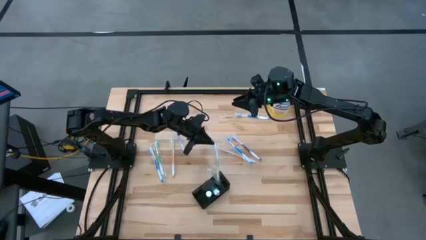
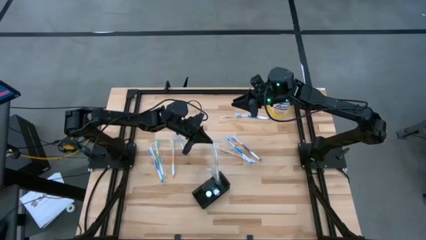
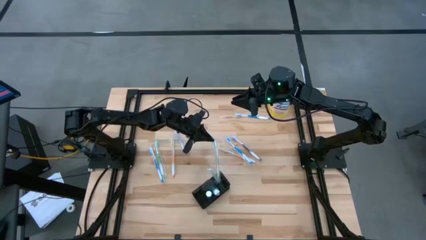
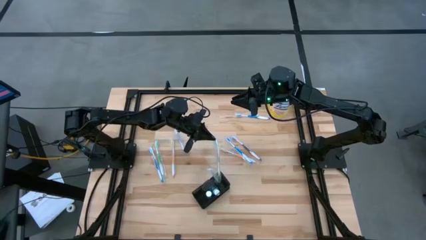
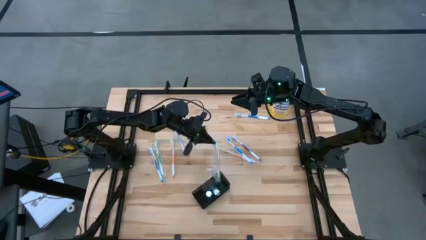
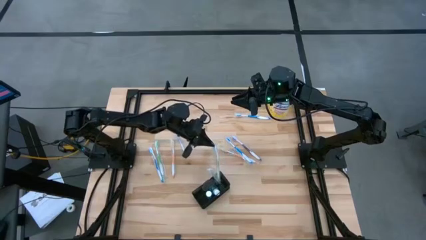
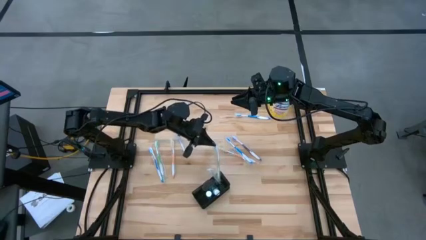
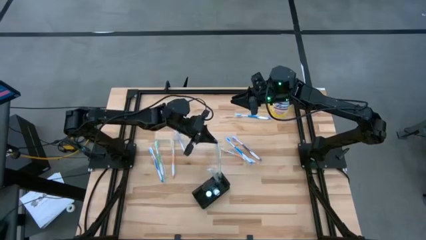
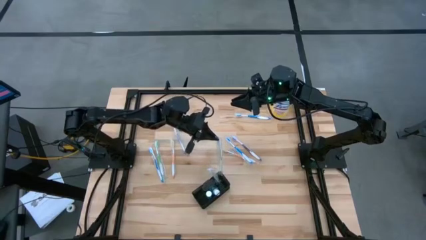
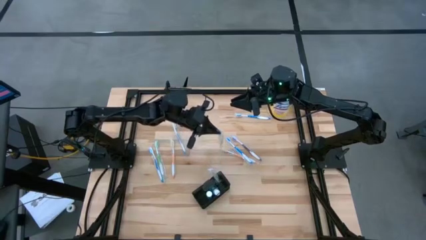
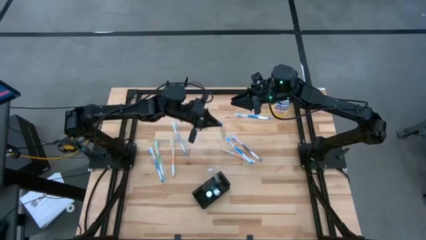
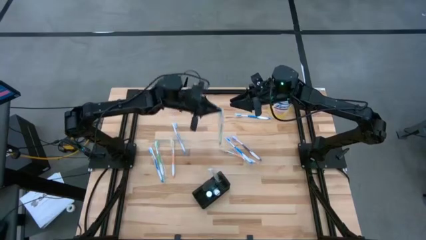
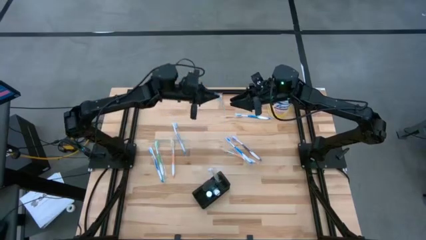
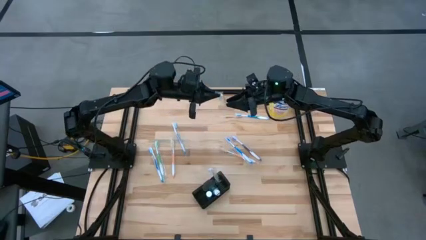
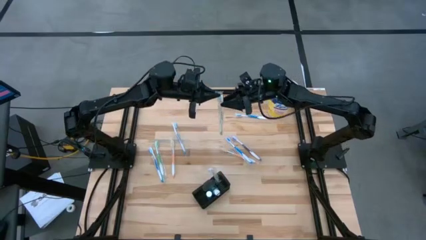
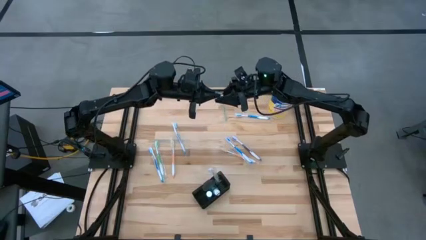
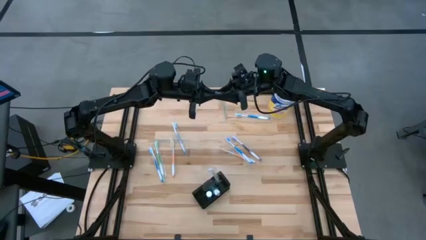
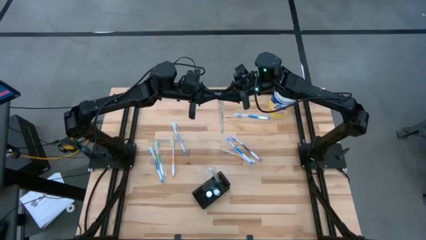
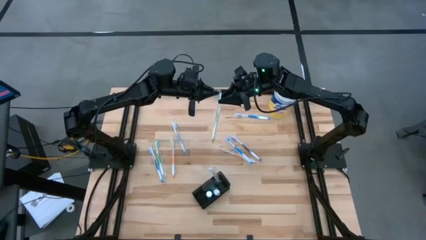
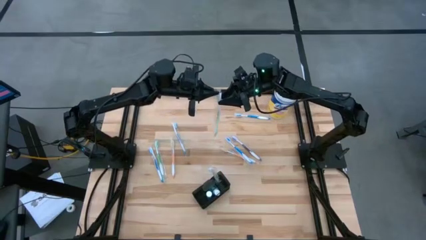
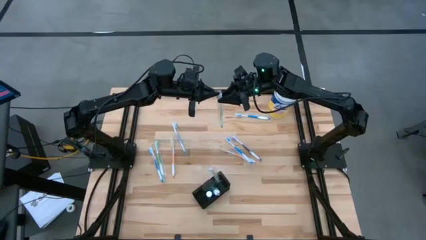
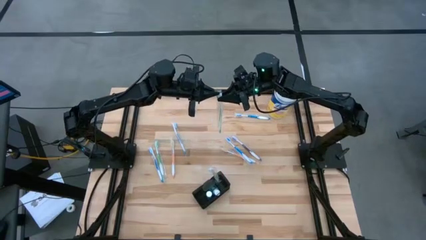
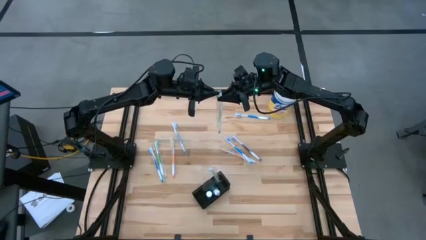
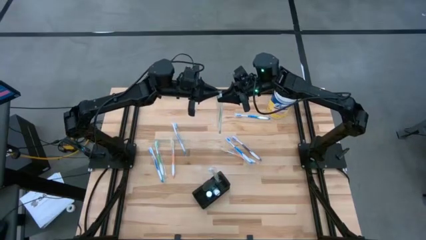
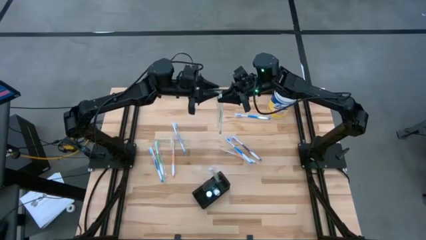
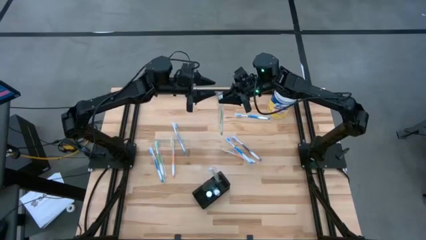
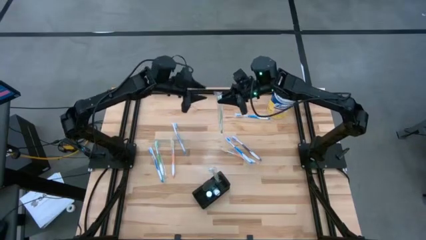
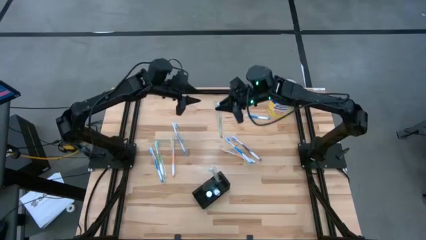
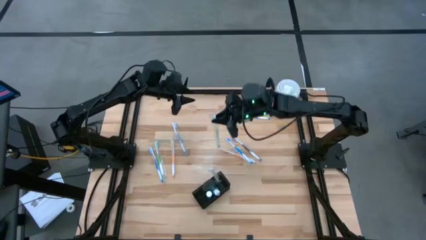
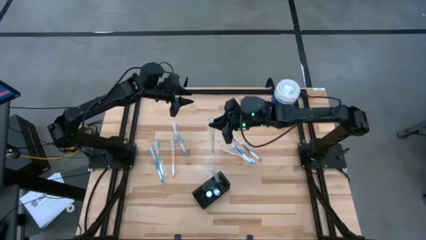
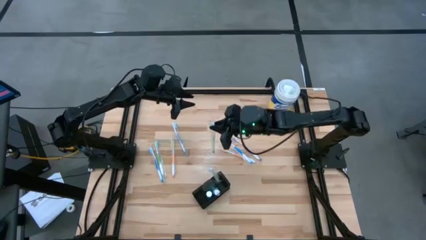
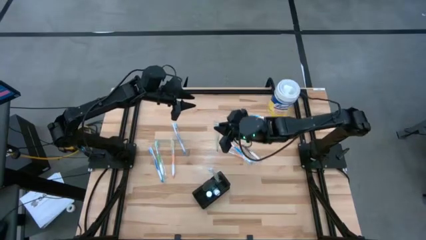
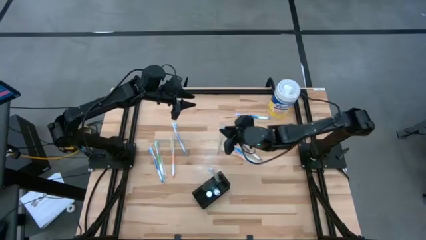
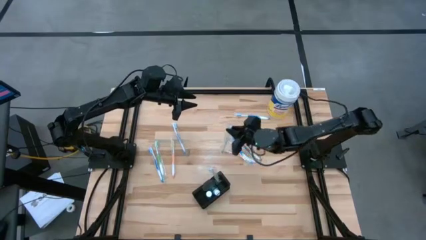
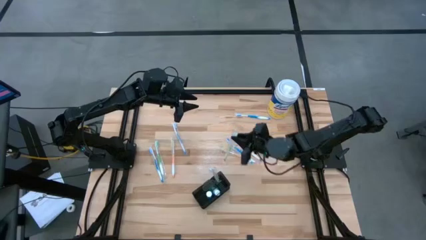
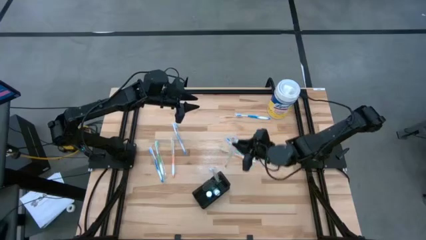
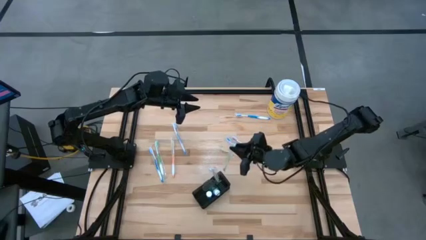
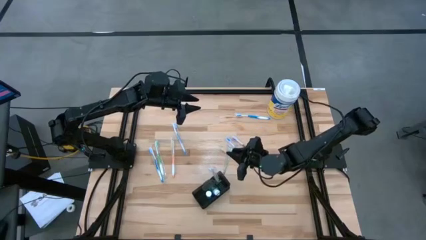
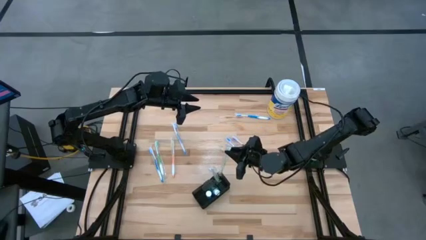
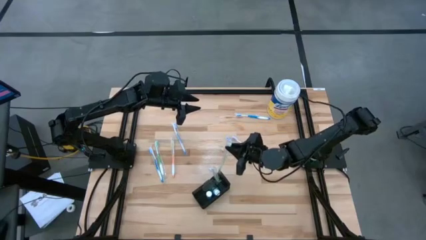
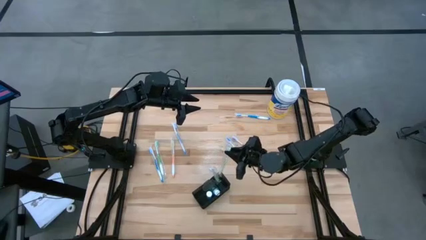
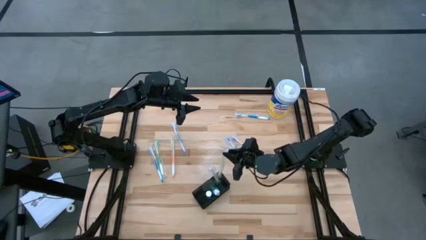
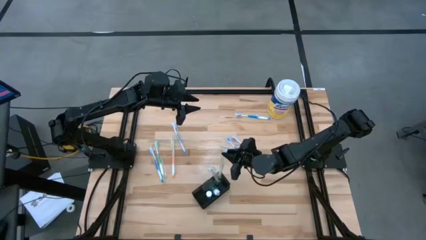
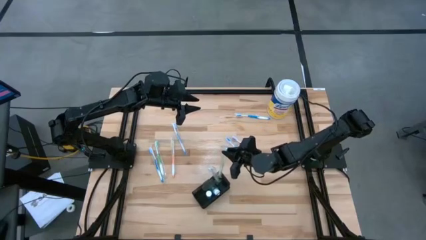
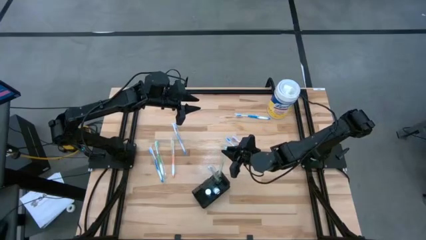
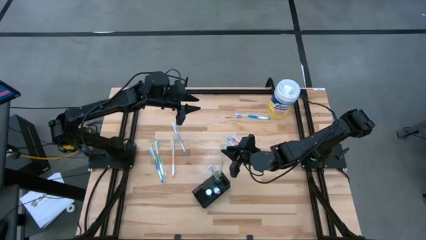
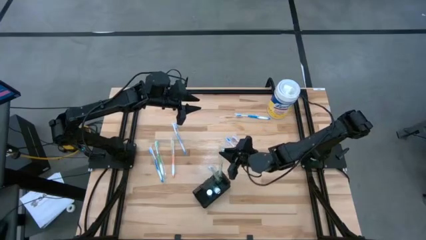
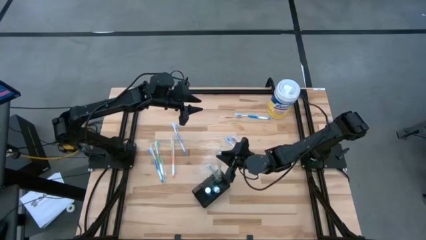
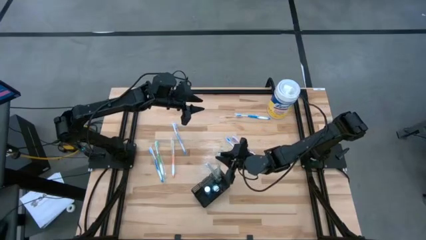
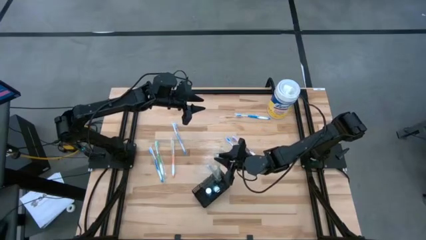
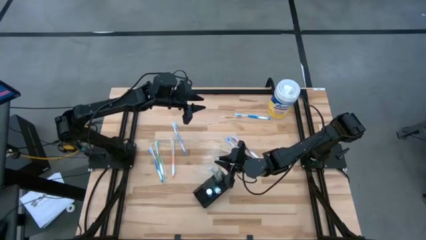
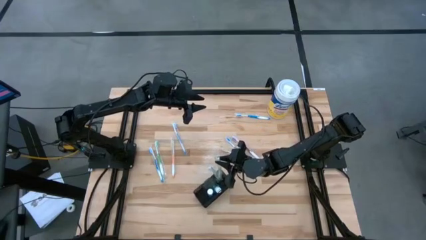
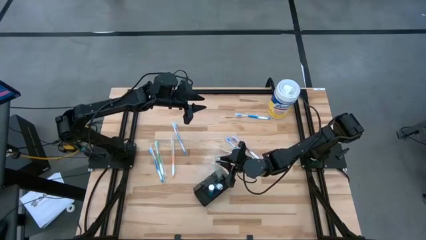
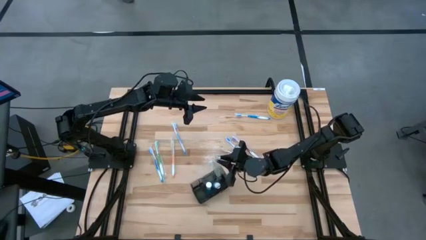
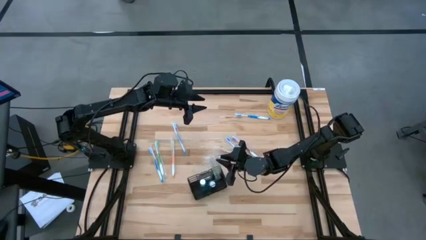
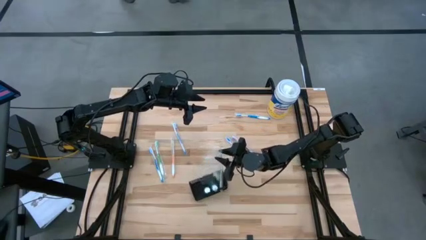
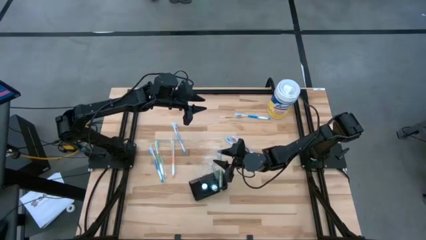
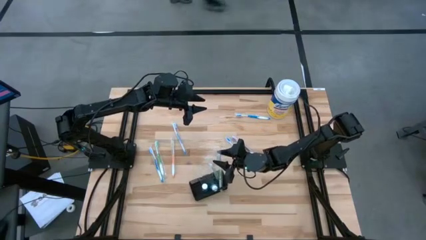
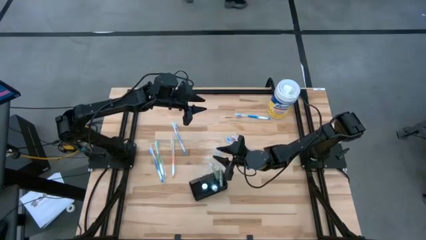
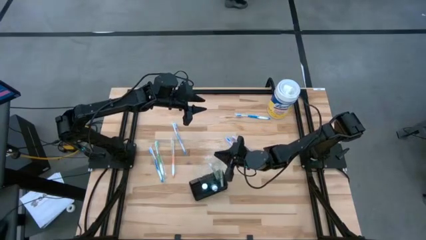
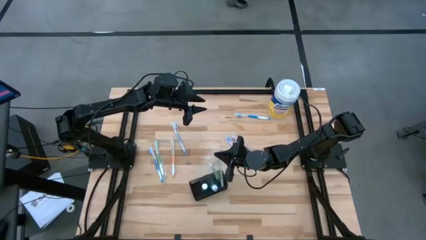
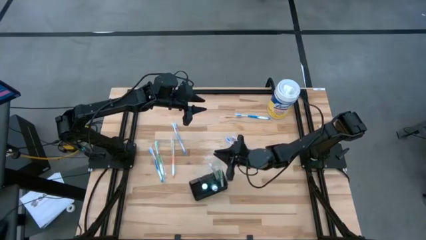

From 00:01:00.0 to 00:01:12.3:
Task: Pick & Place toothbrushing station
Put the green toothbrush into the mesh organizer

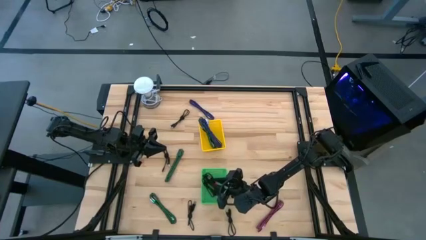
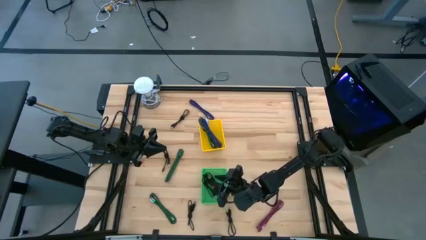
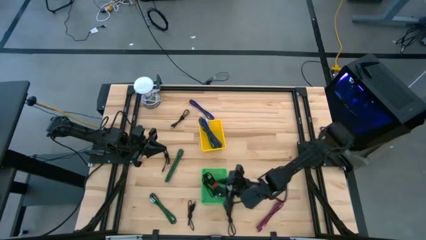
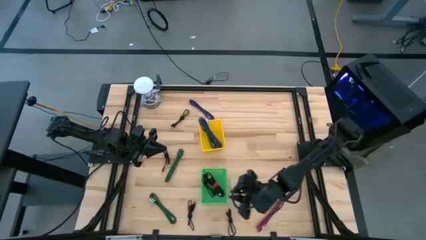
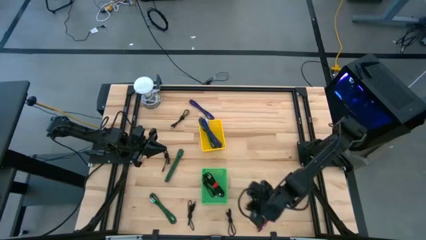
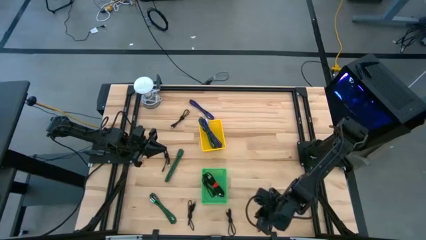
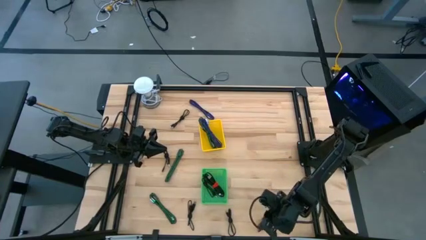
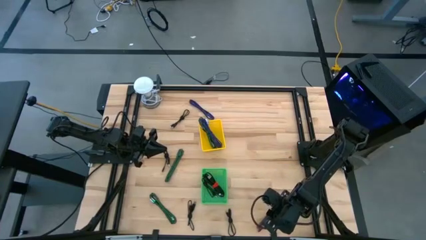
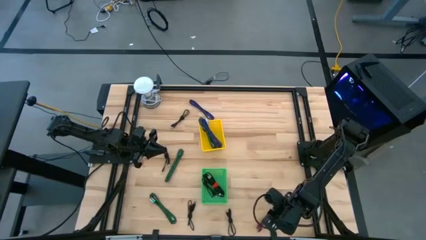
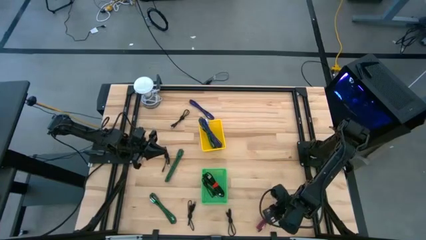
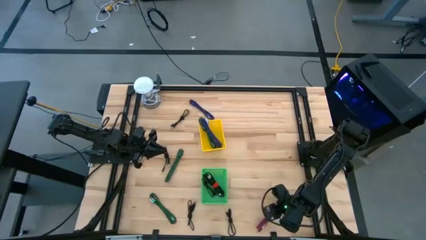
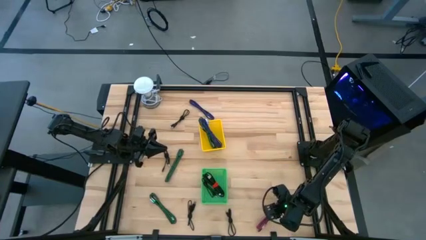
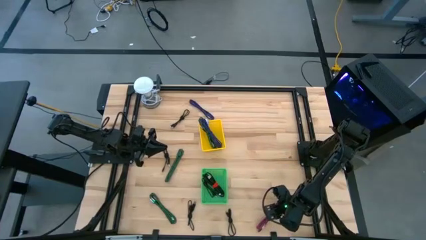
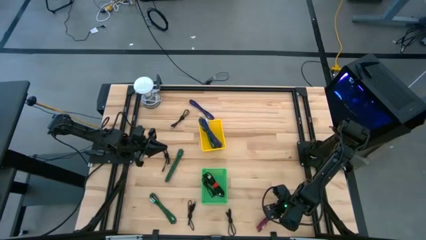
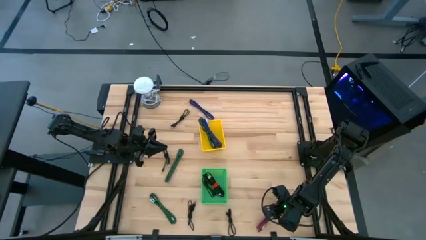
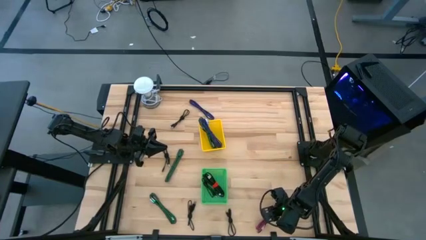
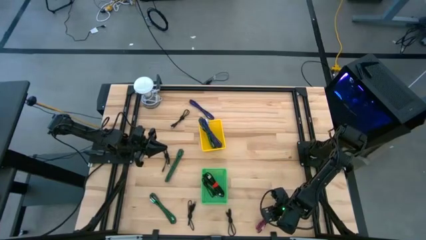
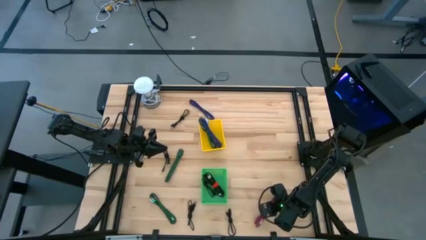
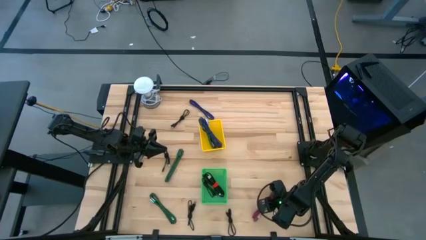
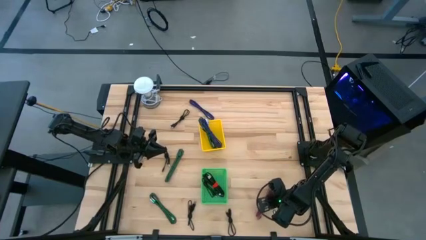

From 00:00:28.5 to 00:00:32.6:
Task: Pick & Place USB Port
Put the pink charger cable into the yellow bin
